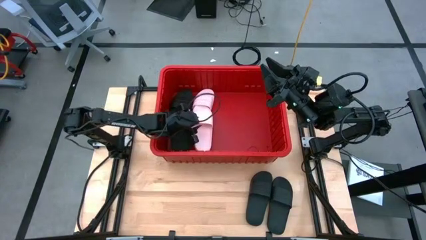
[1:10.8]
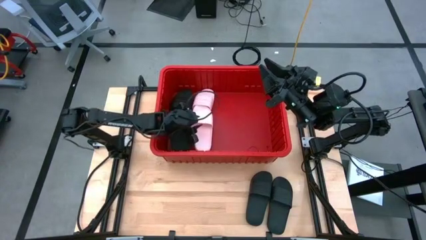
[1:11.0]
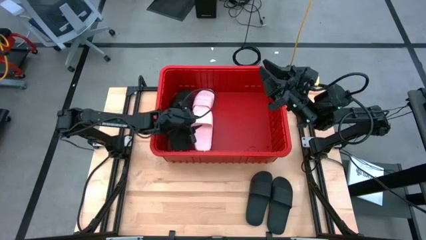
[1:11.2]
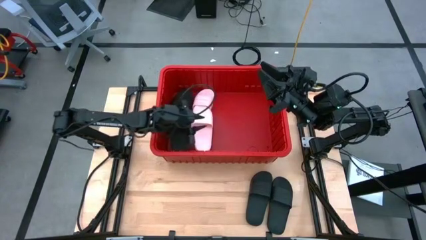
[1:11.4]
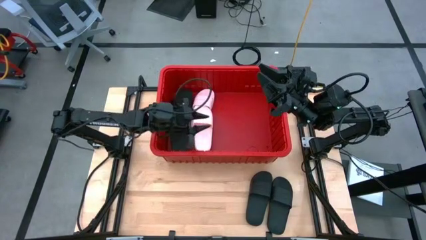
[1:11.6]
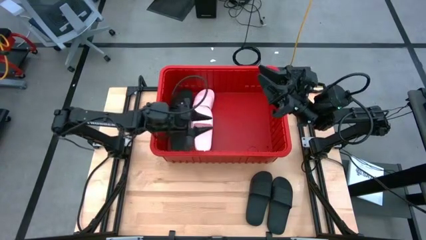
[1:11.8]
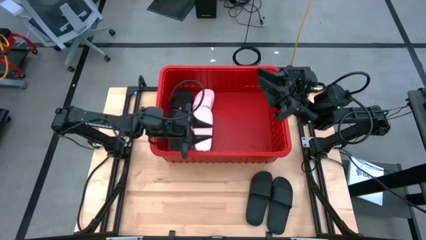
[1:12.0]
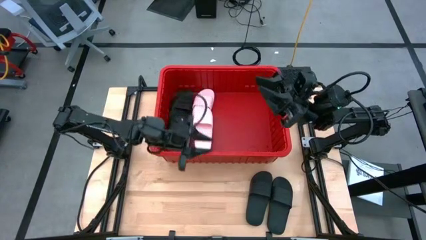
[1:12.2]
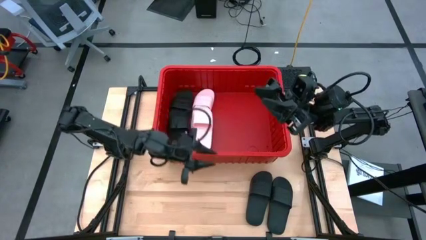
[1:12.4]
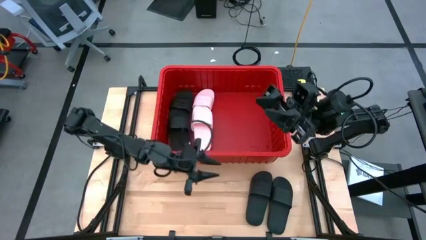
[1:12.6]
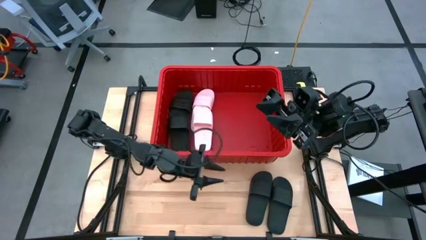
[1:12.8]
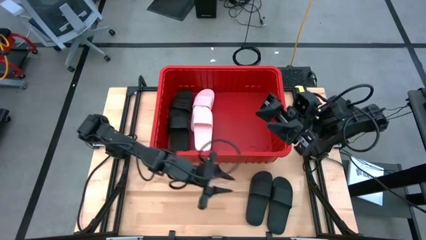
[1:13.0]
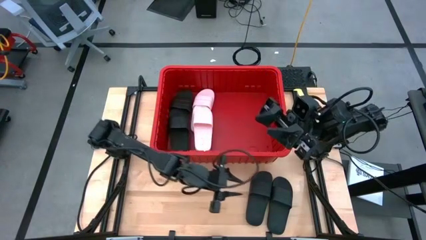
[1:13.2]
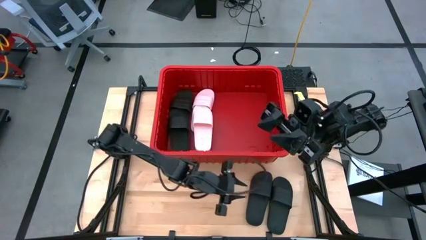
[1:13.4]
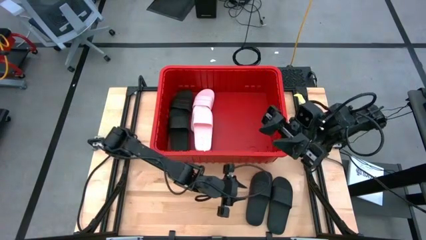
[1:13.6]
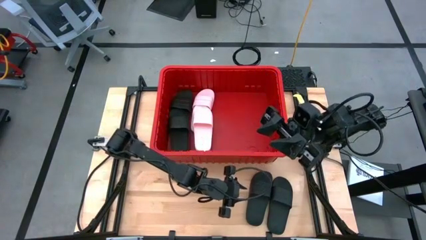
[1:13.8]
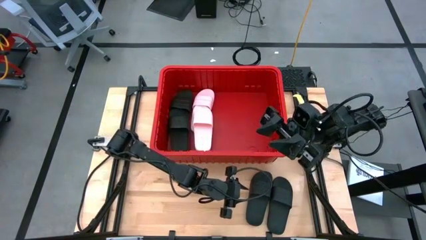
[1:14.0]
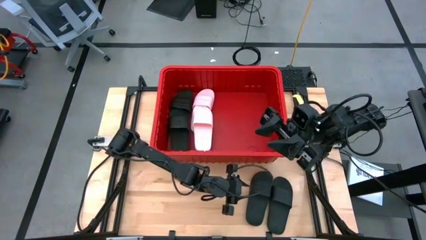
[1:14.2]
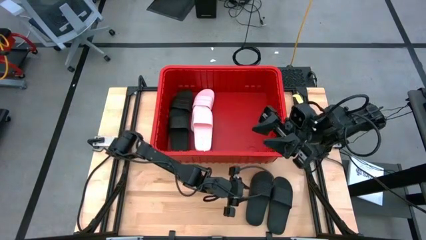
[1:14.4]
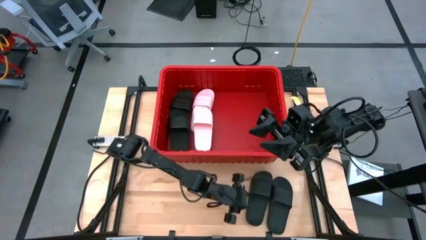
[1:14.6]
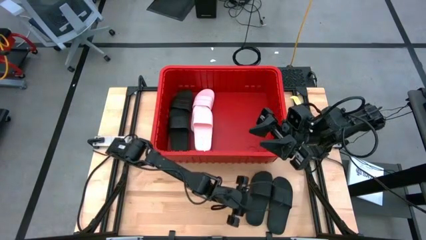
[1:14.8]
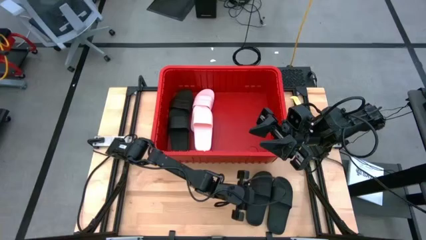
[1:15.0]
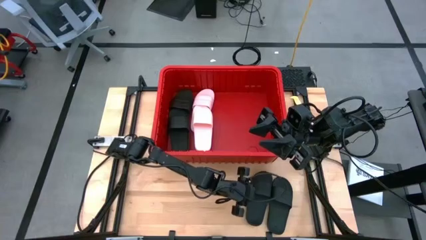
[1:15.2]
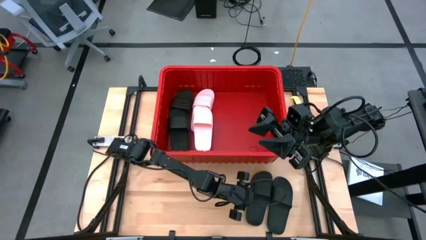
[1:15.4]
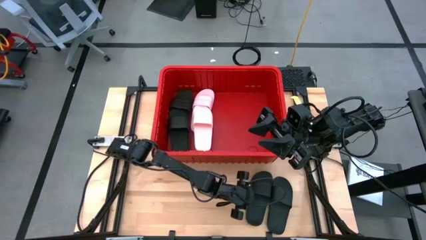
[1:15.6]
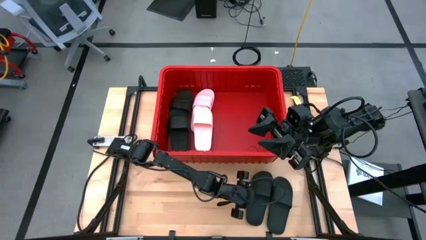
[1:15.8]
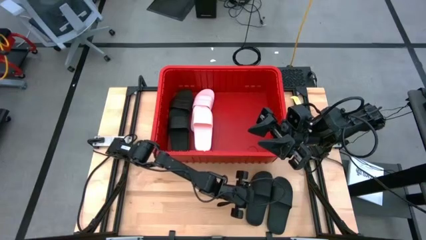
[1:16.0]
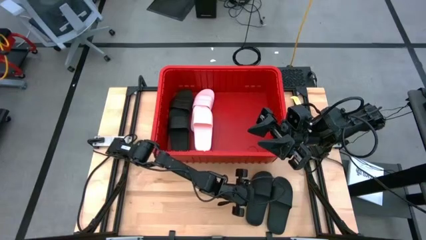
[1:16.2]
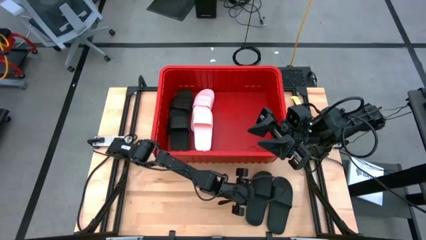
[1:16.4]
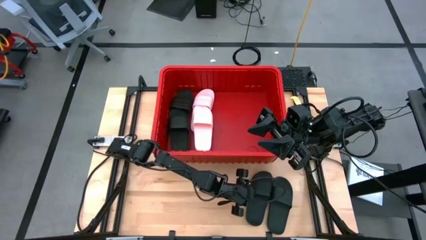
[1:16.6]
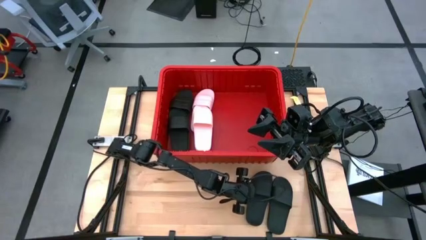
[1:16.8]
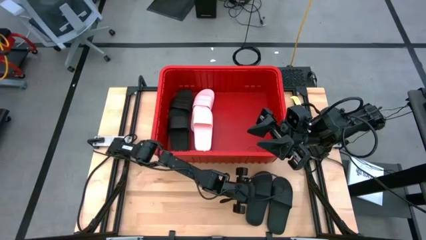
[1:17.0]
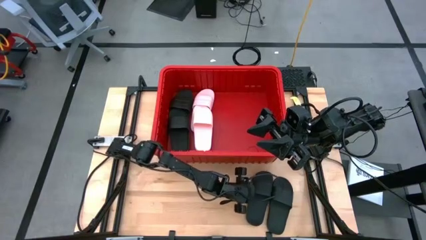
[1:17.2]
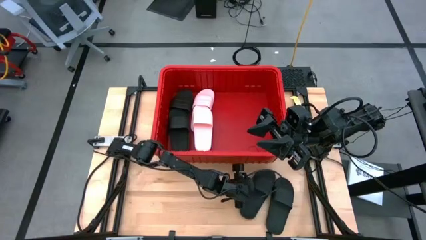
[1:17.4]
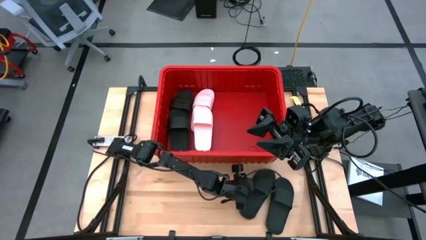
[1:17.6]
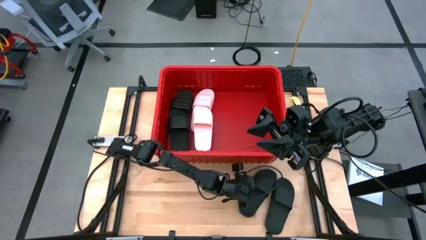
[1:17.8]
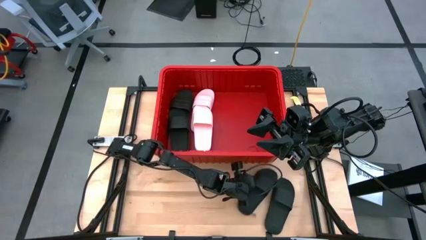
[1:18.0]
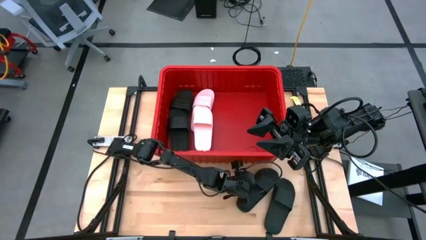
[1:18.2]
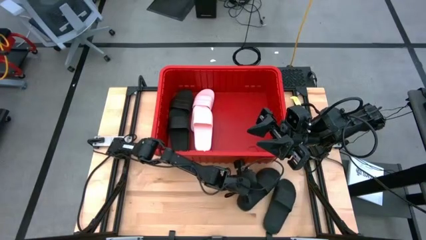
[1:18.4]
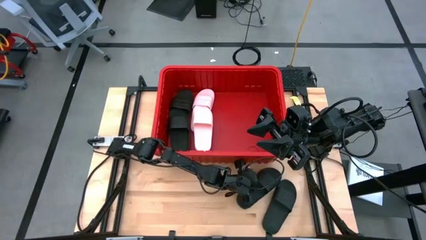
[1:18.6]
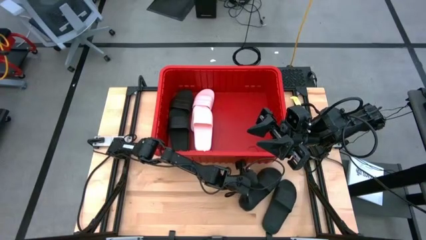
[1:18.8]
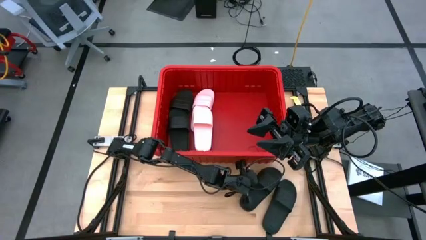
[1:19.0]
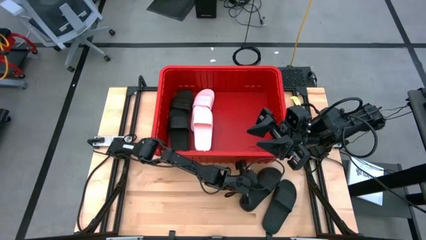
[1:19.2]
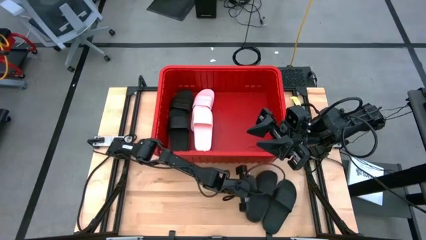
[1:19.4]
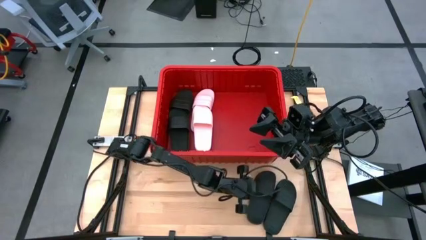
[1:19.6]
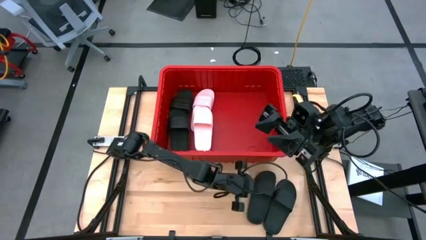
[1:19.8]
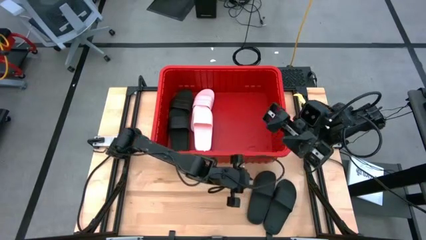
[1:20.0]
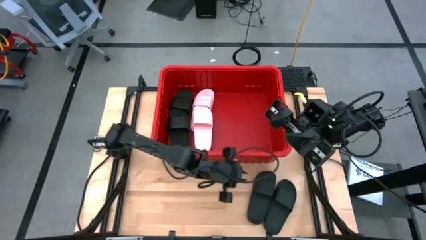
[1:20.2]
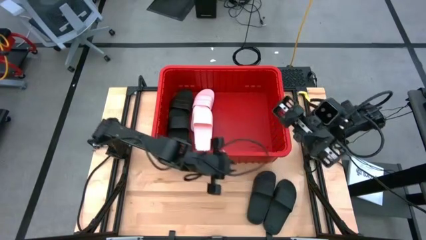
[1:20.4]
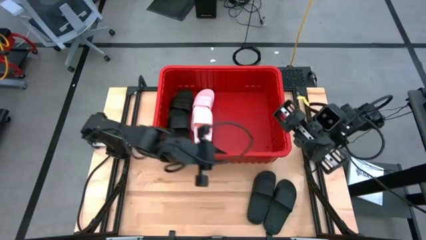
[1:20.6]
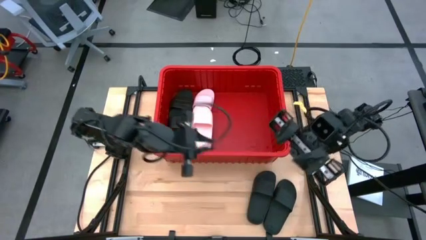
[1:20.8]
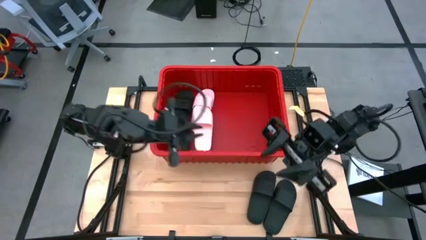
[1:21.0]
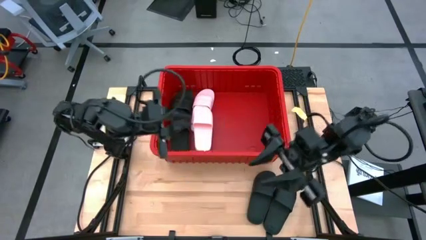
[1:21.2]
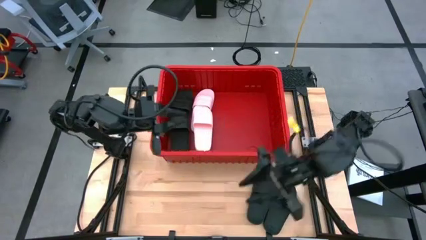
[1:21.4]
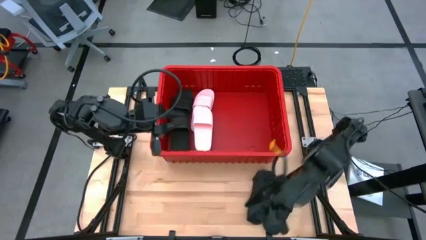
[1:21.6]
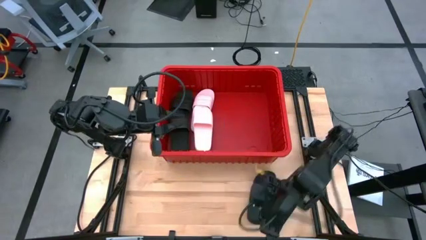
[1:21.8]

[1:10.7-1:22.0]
Task: Pick and place slides into bin
Put the black slide into the red bin
